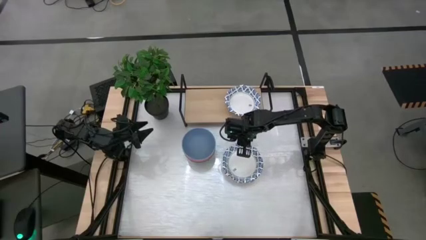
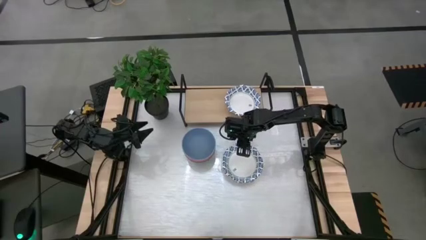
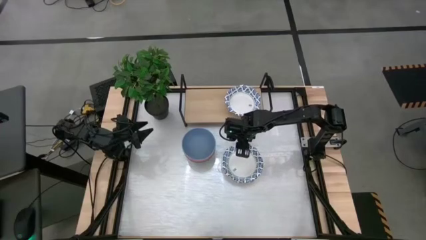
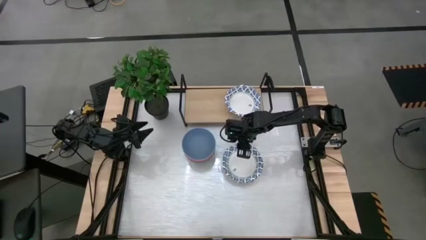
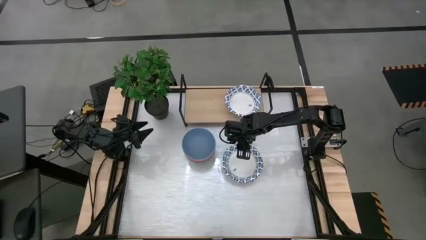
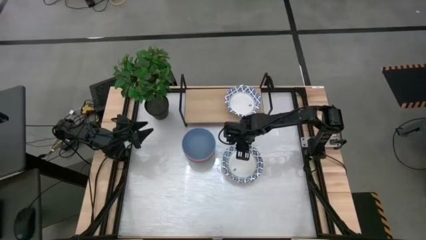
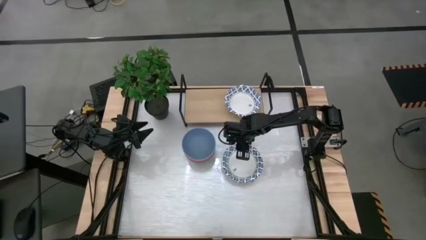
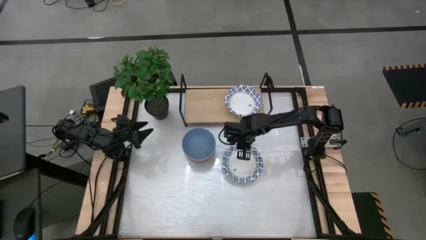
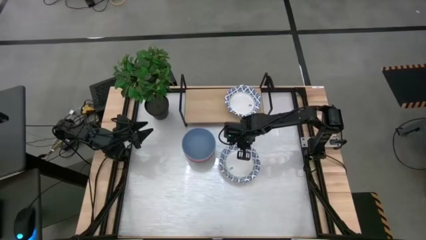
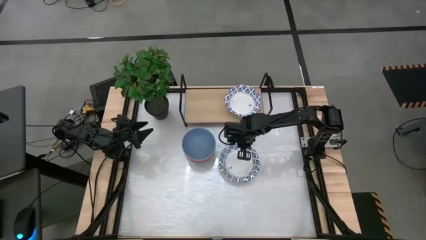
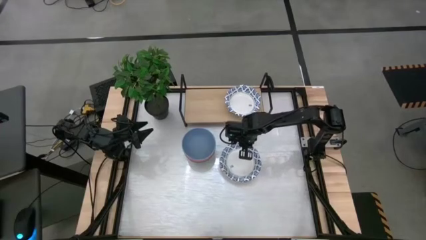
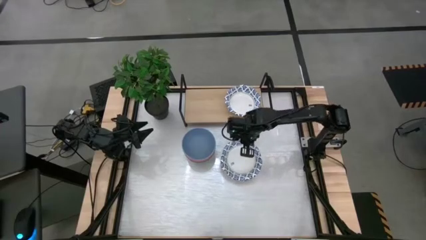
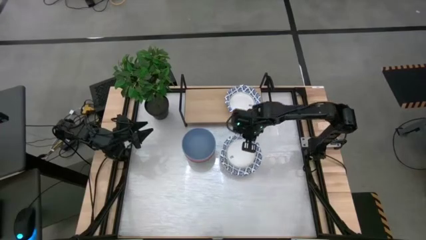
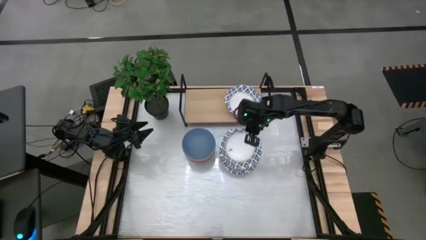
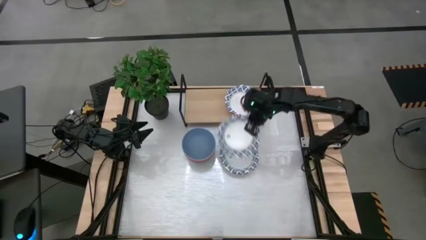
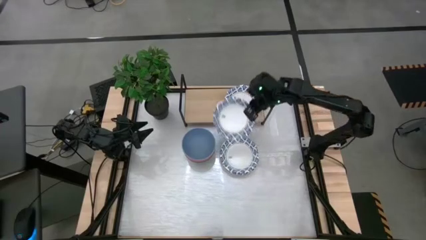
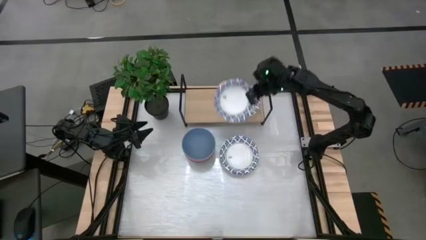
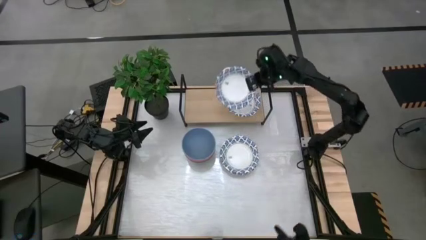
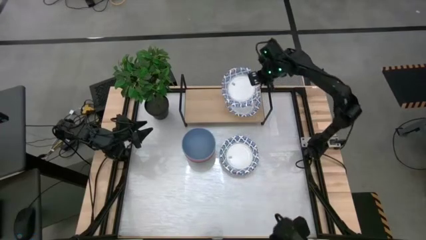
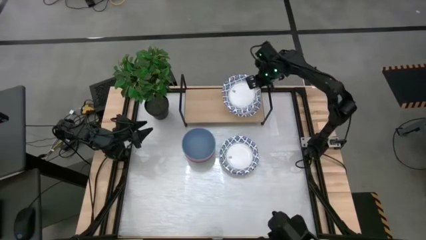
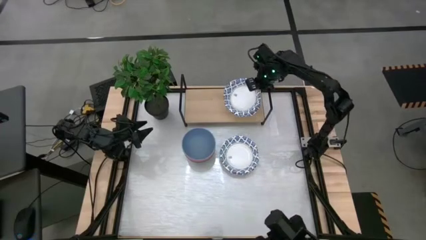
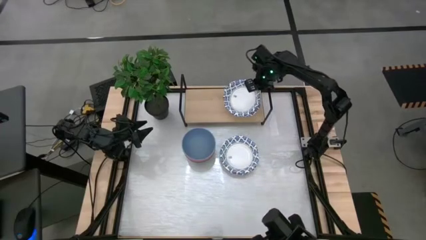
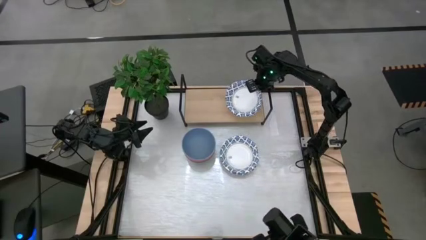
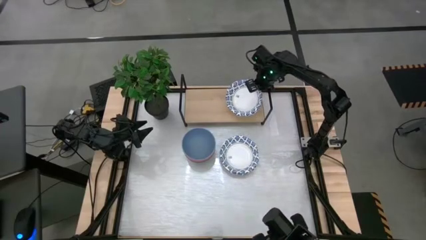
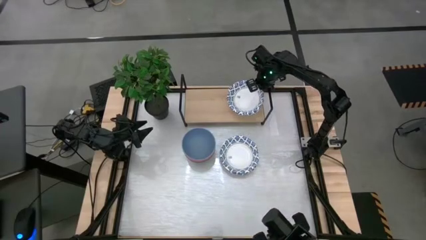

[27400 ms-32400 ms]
Task: Place and stack bowls onto a shelf
Stack the blue patterned bowl on top of the blue patterned bowl on the shelf

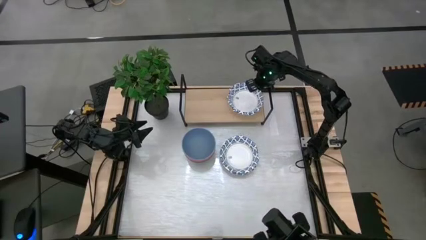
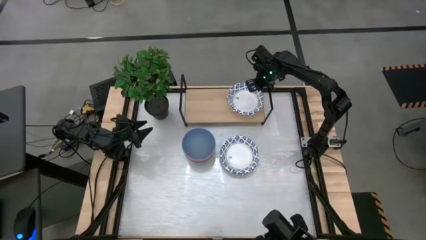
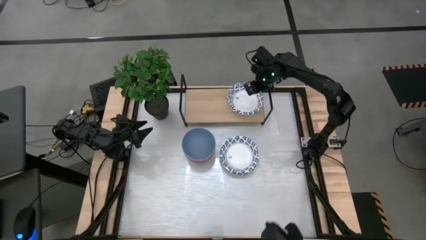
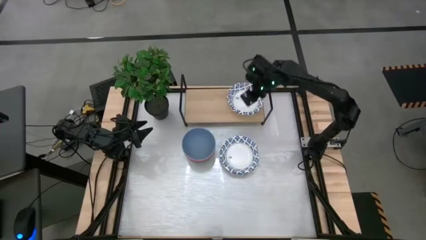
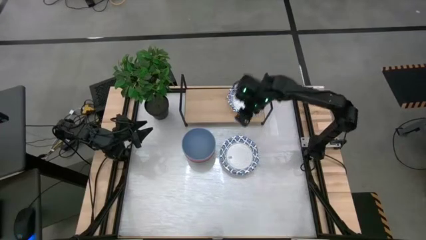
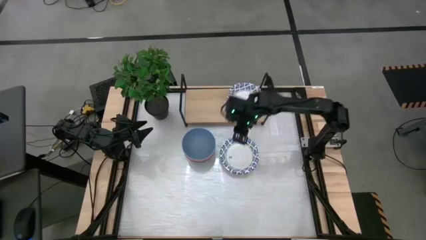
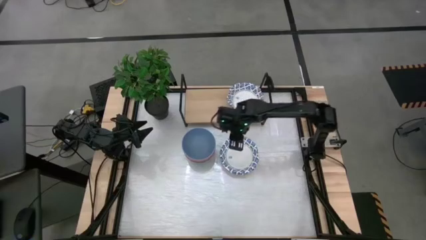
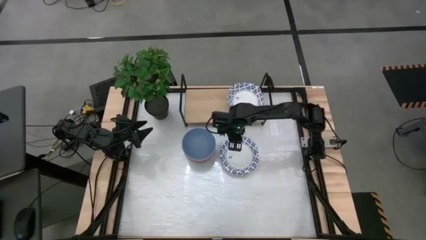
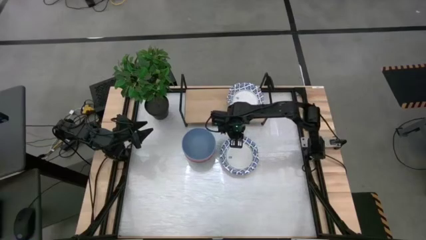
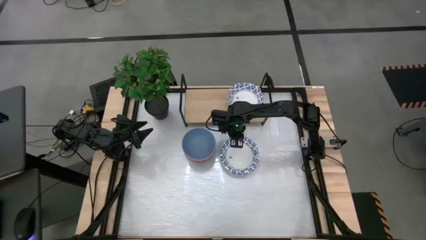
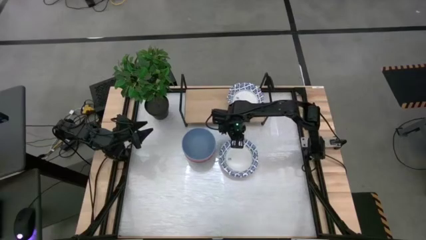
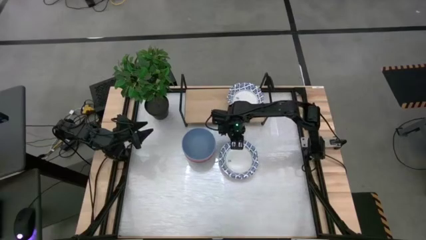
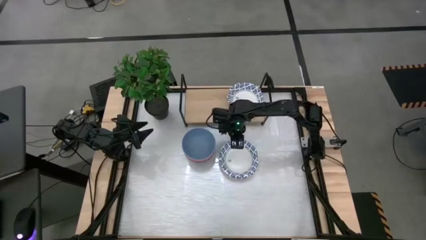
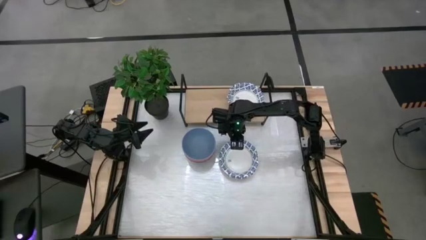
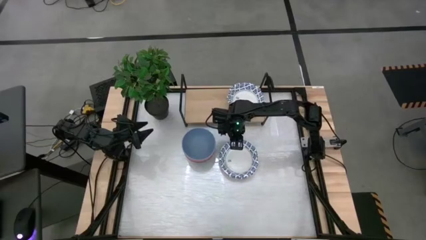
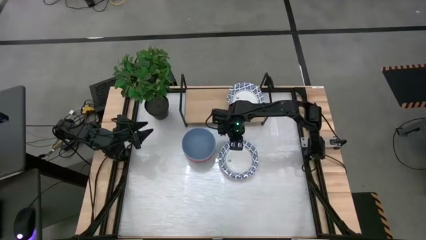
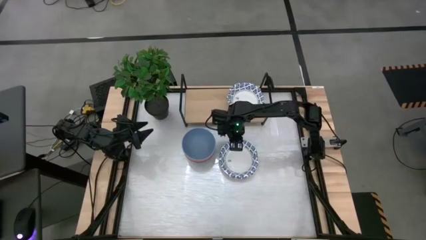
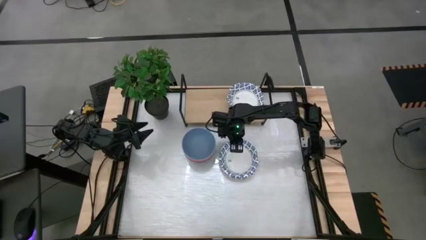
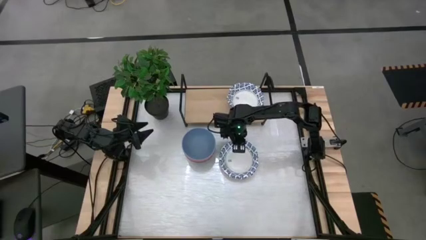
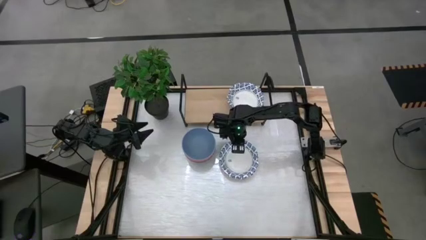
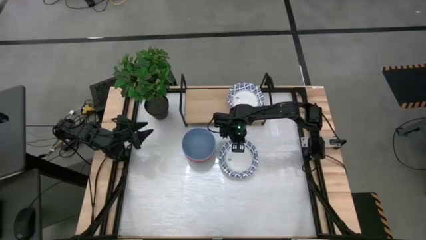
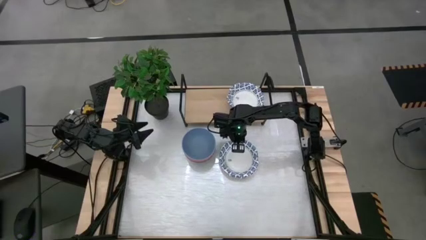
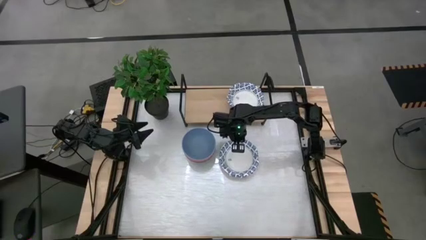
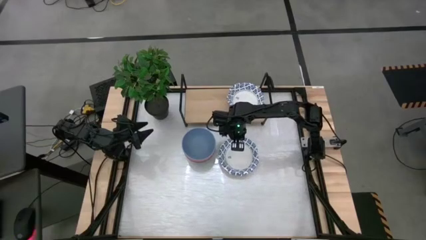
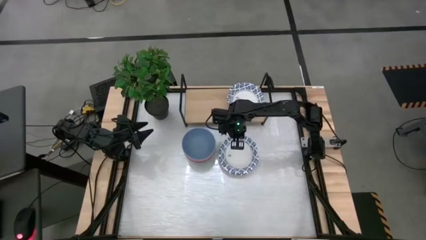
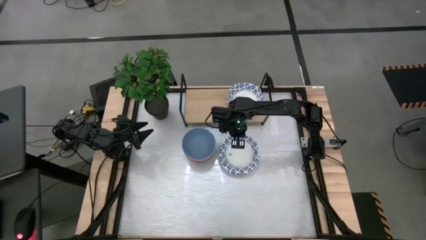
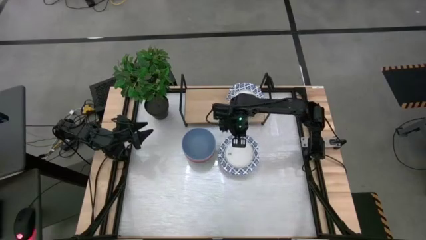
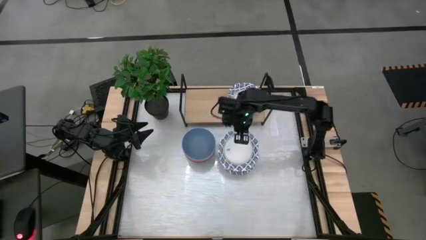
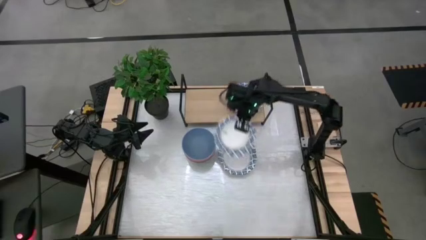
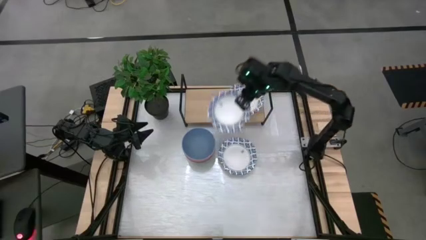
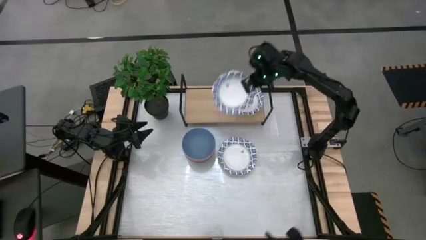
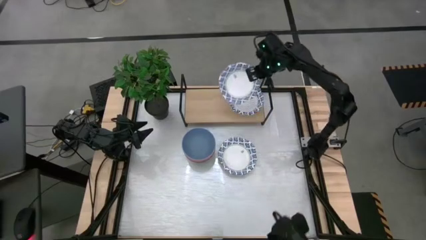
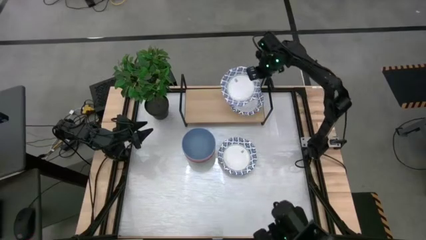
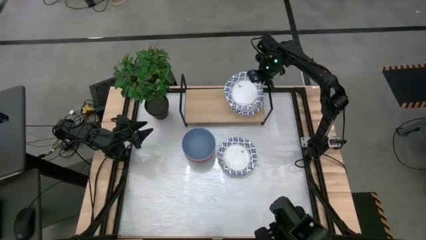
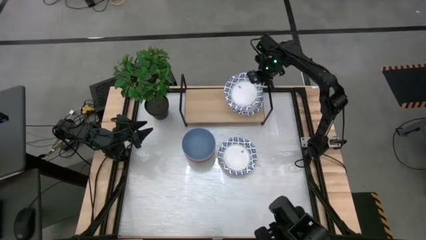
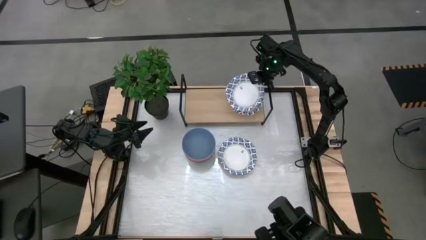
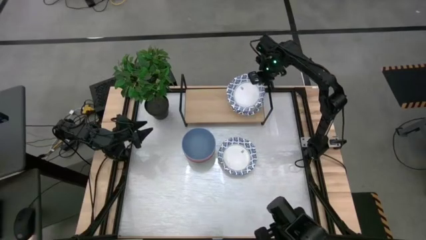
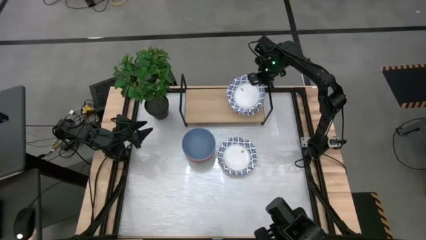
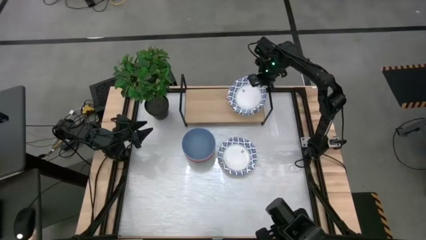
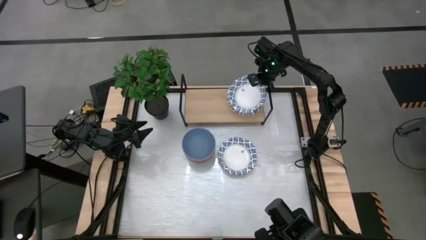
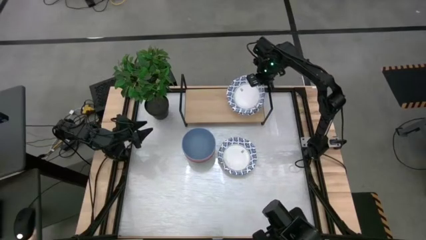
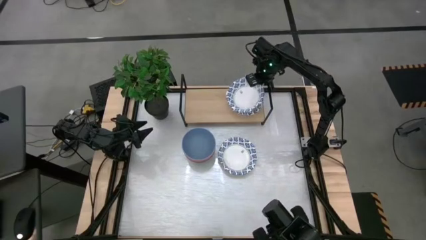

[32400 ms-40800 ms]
Stack the blue patterned bowl on top of the blue patterned bowl on the shelf
